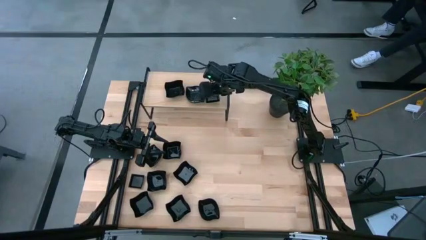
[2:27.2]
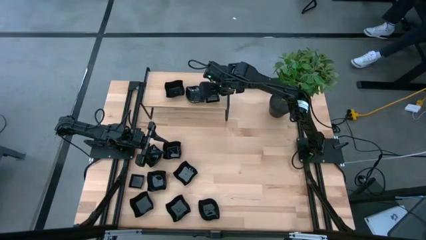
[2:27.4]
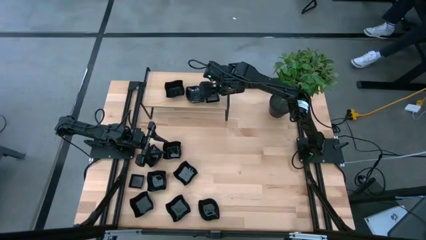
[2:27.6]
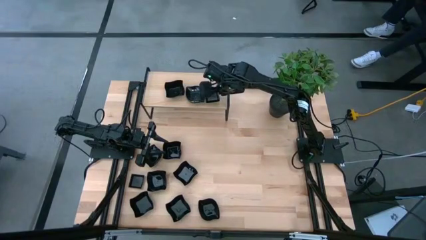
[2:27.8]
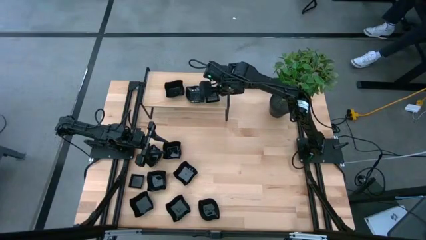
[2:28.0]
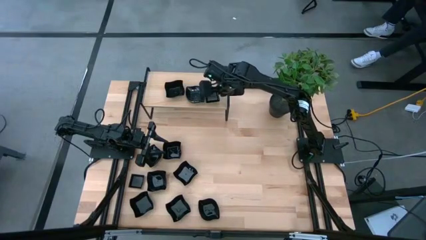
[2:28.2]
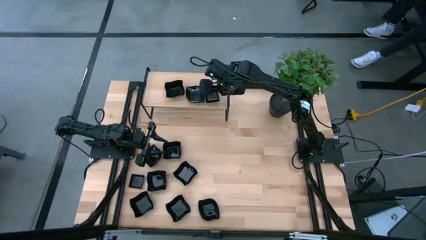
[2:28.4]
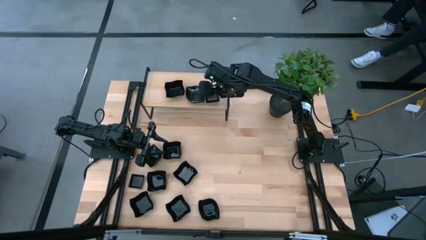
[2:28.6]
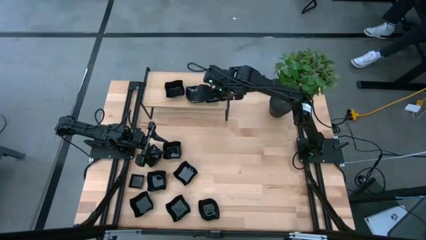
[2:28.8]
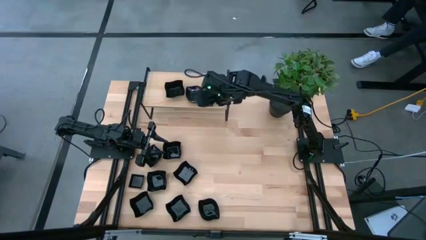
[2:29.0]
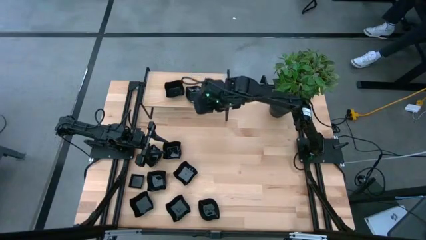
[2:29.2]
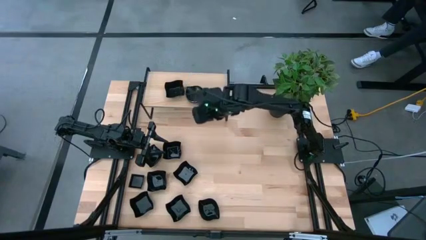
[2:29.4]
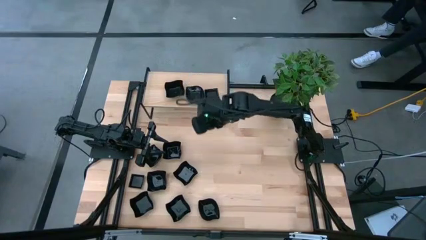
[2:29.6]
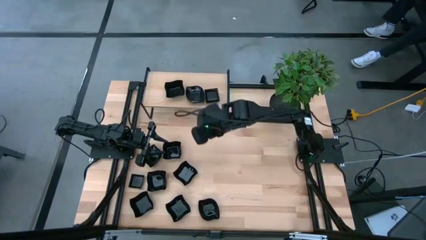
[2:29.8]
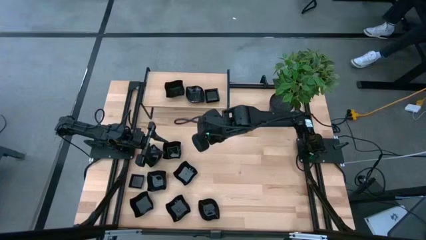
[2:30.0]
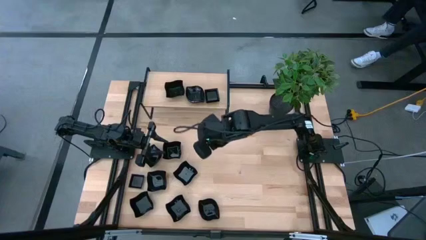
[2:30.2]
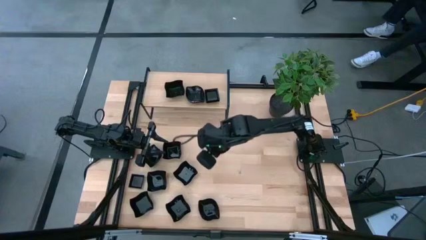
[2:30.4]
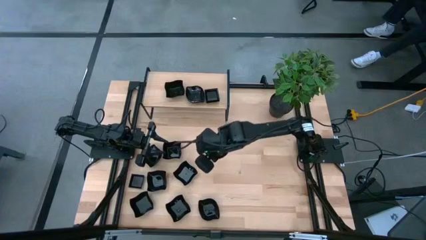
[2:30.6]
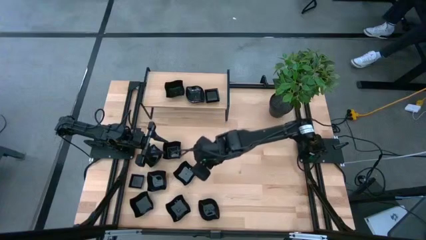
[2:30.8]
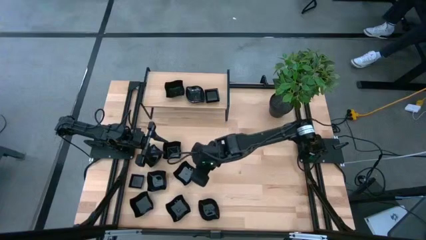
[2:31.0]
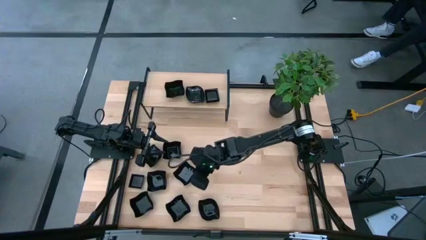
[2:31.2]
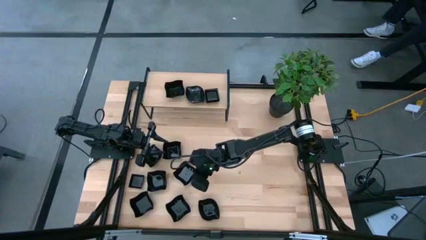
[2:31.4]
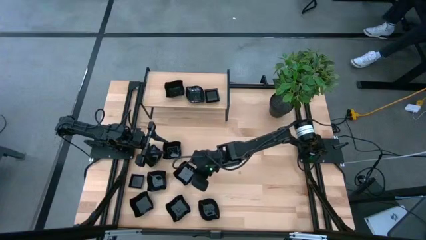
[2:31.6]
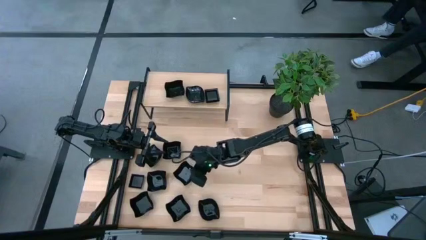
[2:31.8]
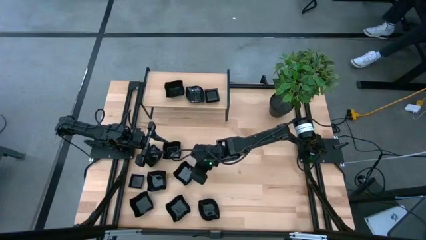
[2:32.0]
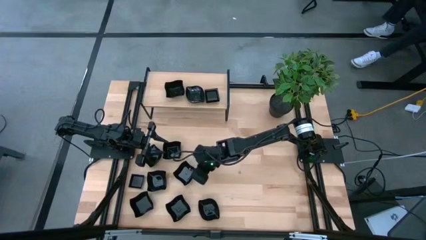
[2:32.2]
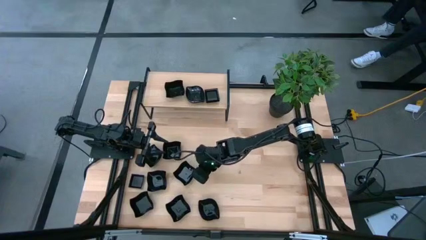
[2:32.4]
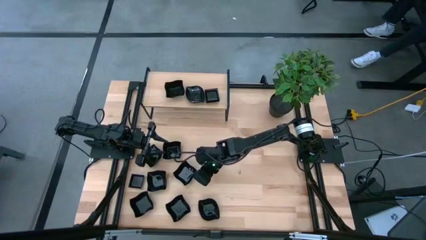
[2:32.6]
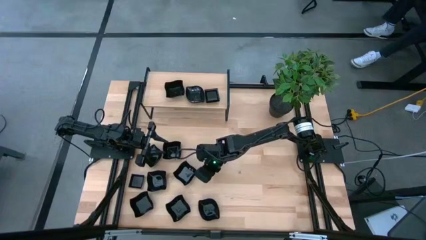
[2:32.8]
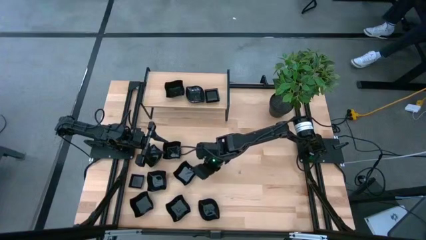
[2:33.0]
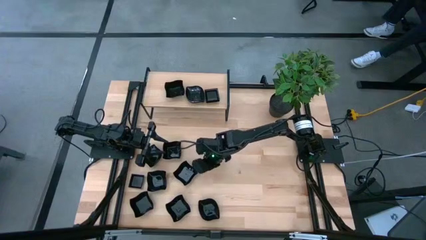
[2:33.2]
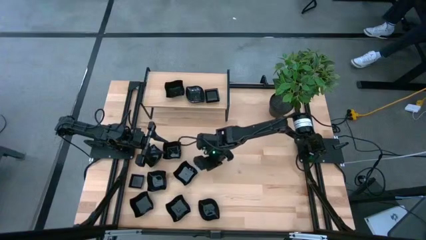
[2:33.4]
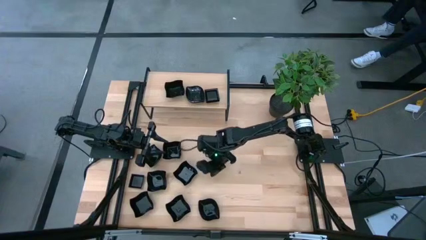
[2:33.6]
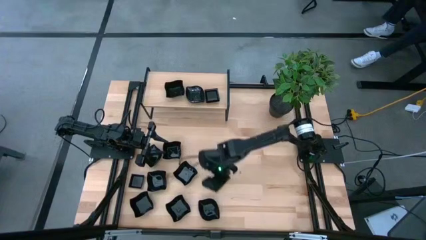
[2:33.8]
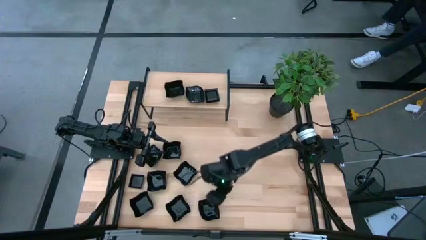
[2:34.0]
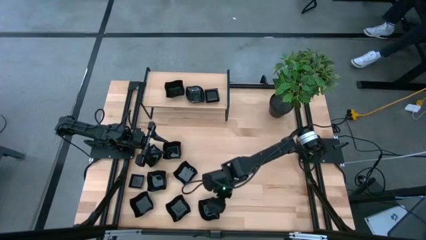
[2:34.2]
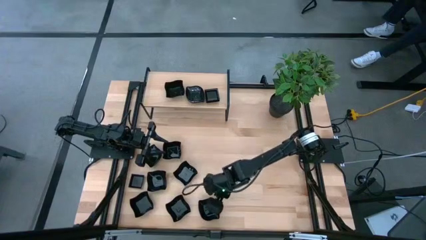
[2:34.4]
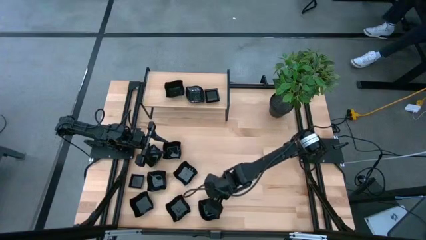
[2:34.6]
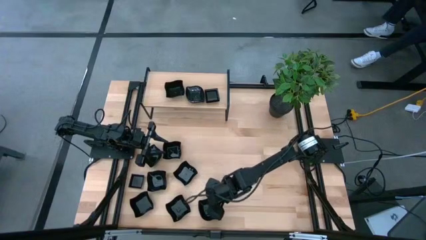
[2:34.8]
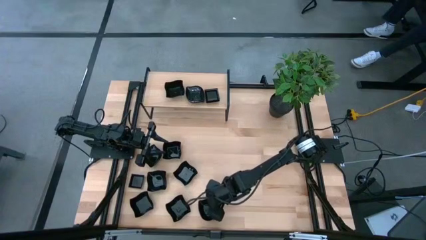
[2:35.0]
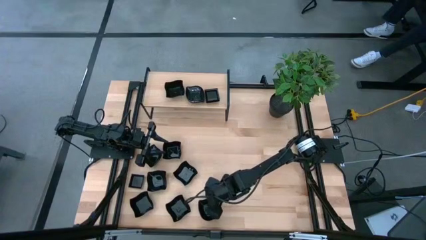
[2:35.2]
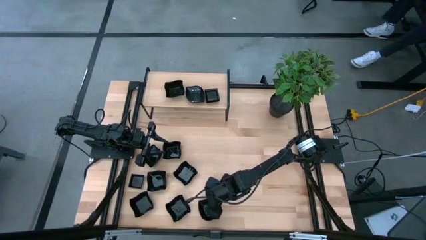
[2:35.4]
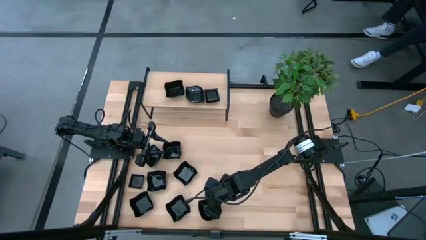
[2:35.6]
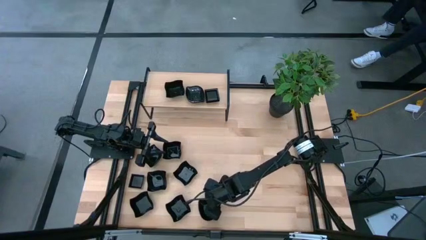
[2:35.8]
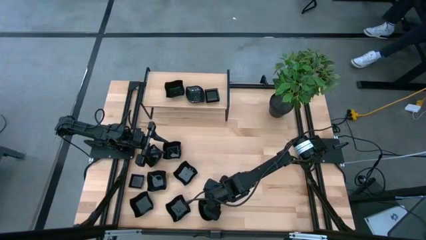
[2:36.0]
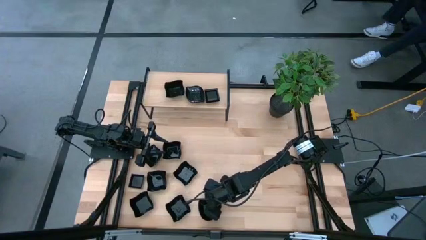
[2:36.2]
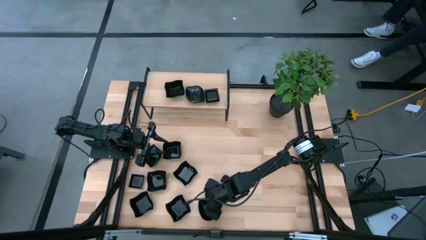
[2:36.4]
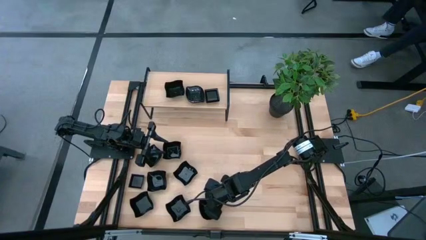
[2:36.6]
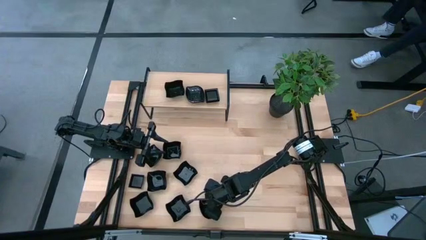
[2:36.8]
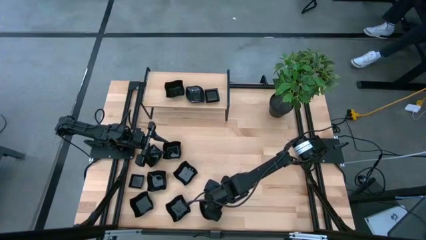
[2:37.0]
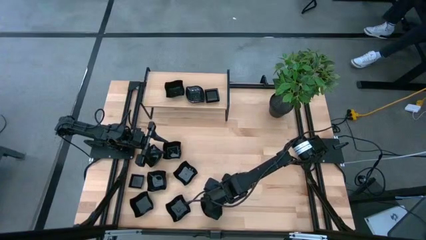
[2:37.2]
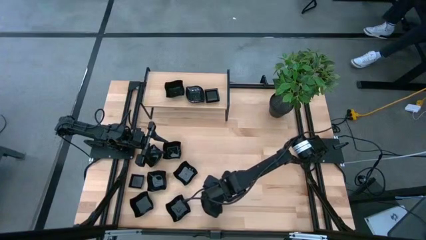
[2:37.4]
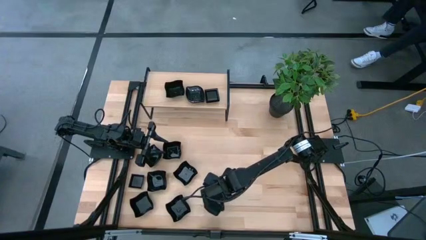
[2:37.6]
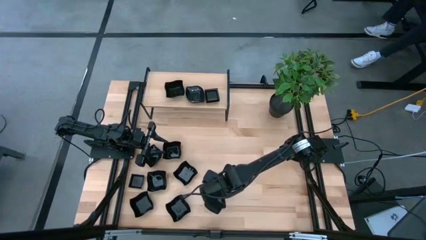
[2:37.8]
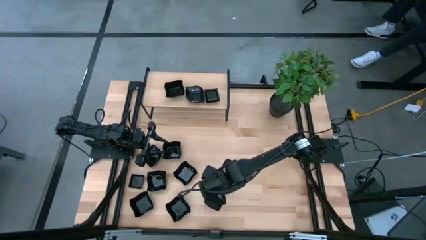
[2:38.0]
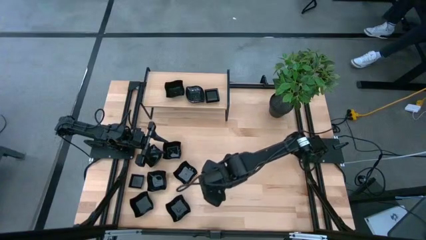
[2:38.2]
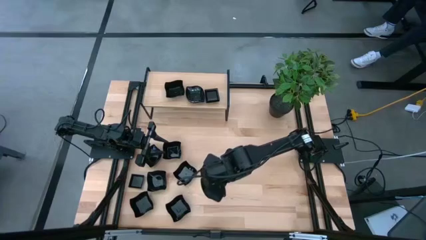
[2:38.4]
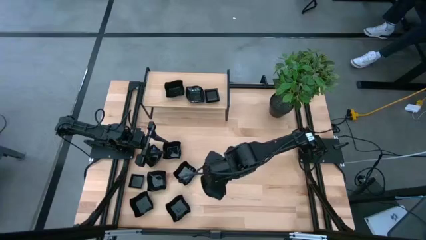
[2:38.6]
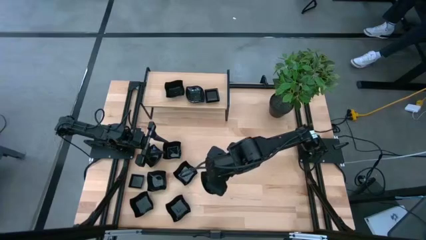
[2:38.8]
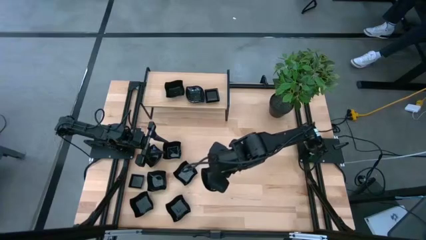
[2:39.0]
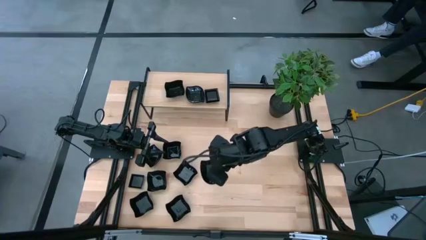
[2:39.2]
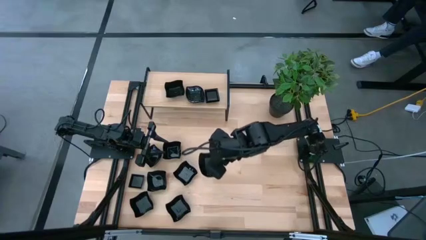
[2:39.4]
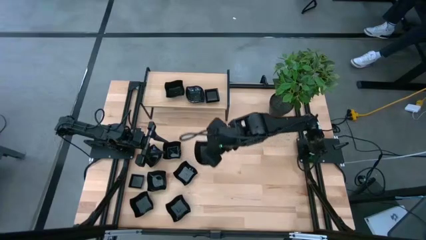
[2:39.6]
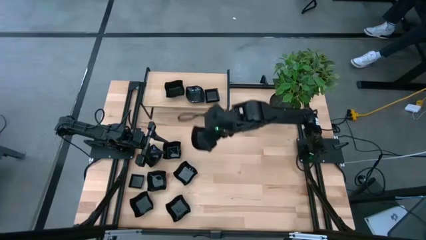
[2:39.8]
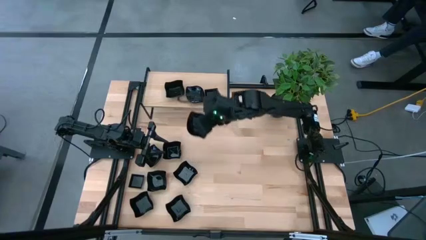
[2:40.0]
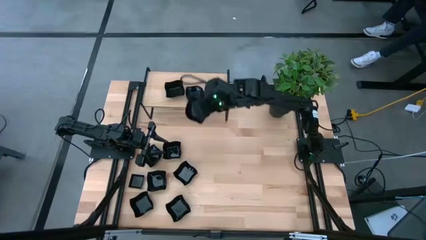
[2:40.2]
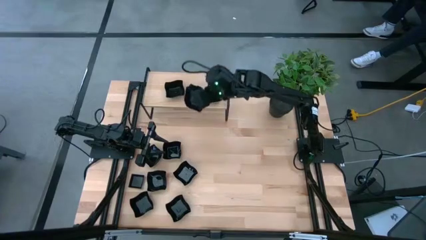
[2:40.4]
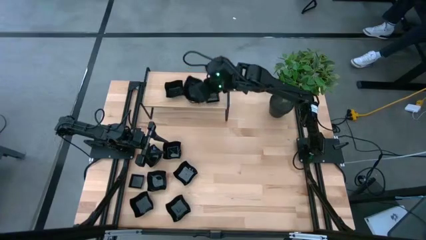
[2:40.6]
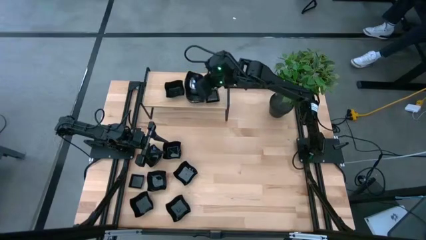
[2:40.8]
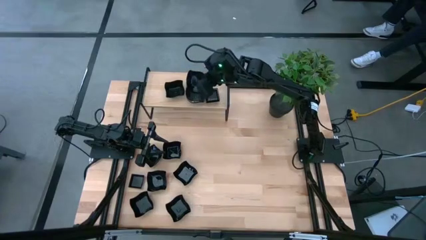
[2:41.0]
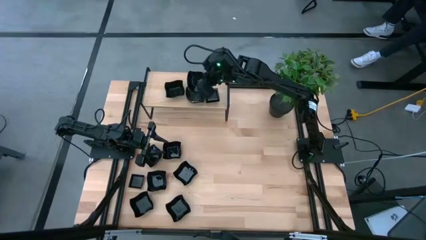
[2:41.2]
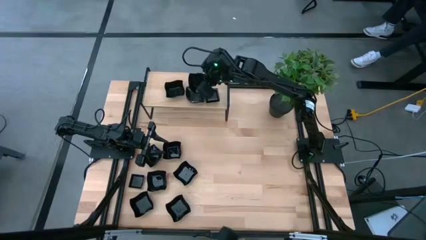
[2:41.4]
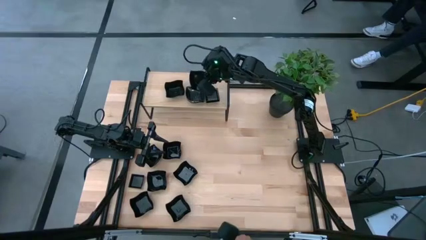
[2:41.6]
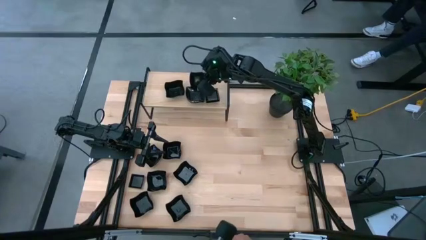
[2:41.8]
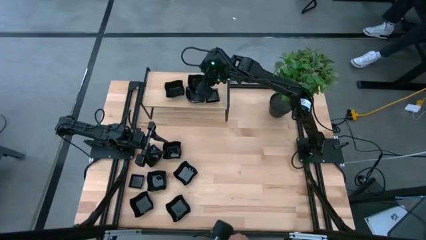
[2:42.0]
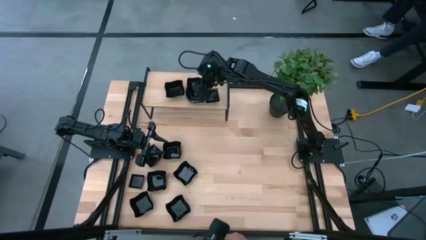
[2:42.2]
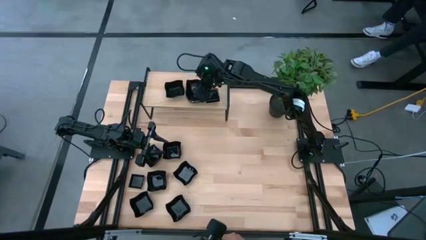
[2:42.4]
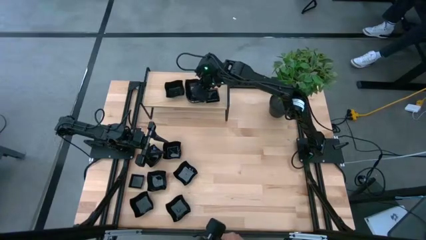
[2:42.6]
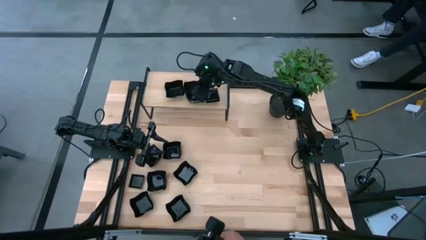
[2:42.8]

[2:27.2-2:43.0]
Task: Pick & Place Mini shaped plates
Stack the leaf shaped plate on top of the leaf shaped plates on the shelf

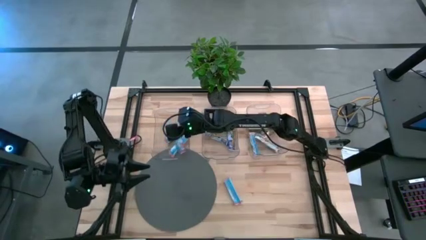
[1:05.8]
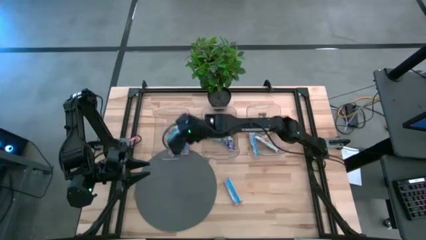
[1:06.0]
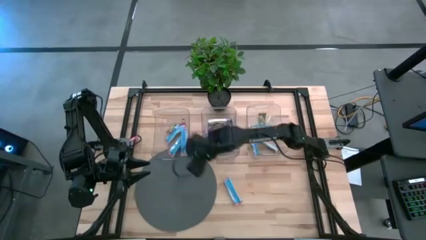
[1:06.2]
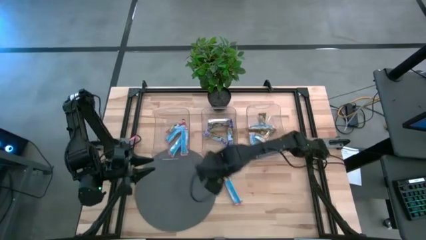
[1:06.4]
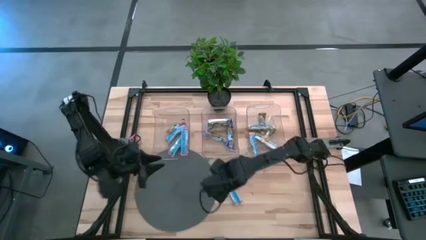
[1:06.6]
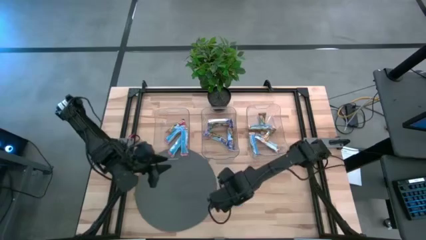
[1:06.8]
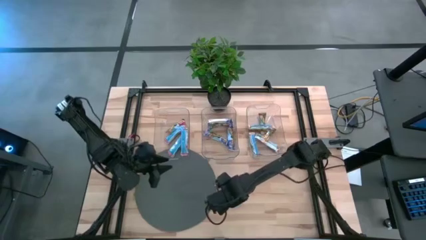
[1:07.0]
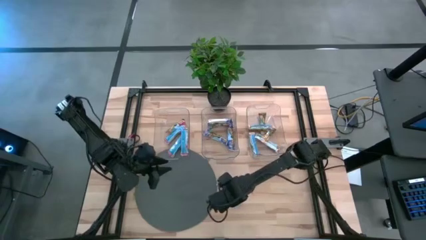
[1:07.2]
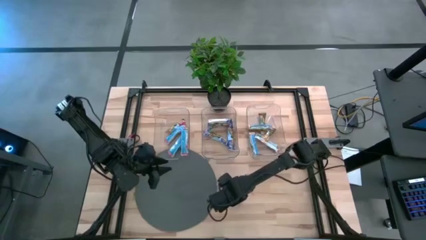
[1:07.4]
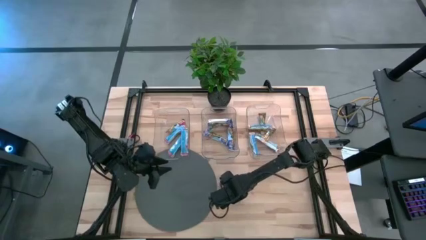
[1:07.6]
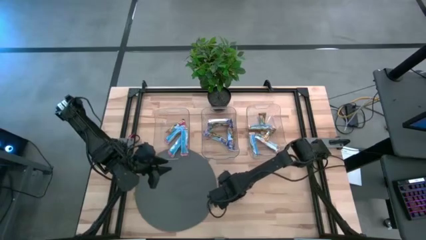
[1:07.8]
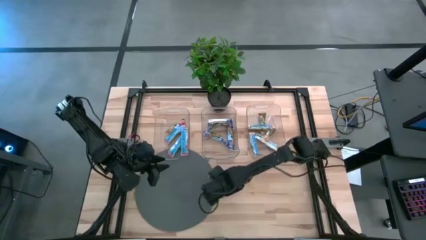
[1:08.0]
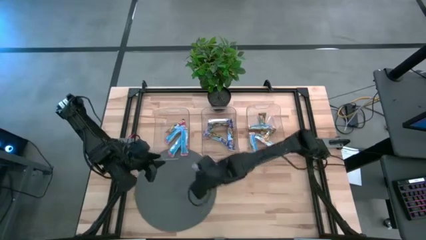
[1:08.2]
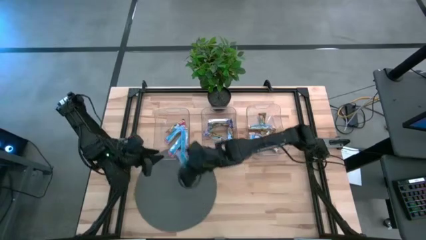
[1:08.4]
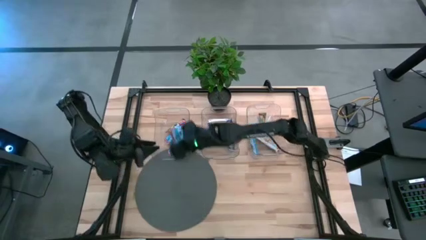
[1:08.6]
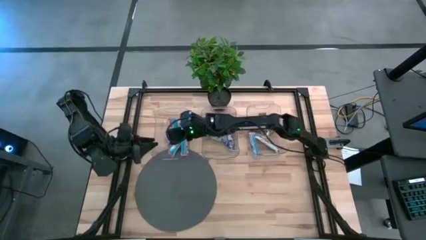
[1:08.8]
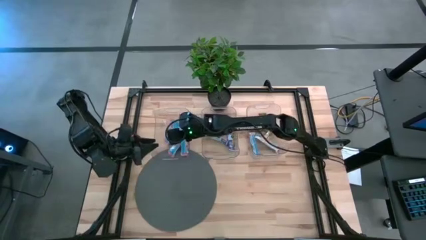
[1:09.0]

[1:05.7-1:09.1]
Task: Pick and place Granola Bars by type
Put the red granola bar into the left transparent bin
